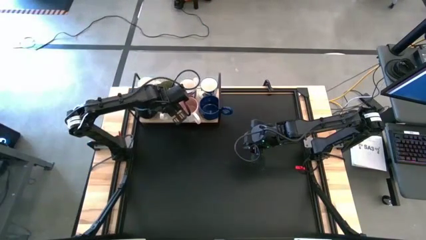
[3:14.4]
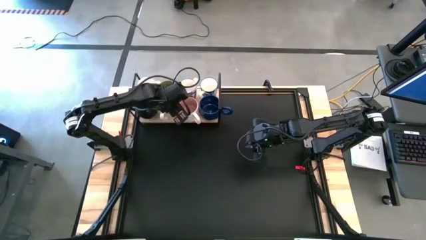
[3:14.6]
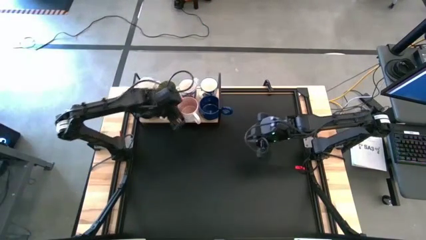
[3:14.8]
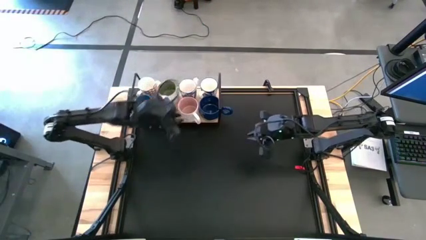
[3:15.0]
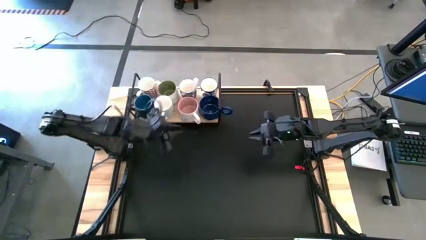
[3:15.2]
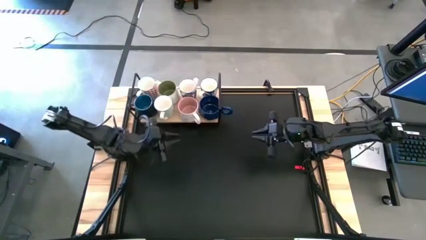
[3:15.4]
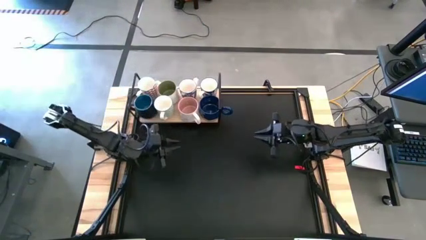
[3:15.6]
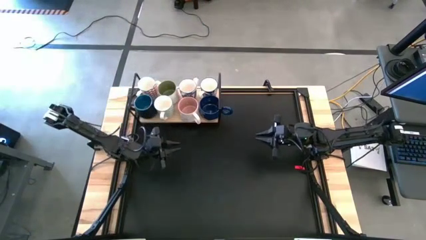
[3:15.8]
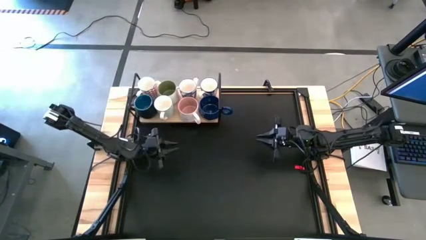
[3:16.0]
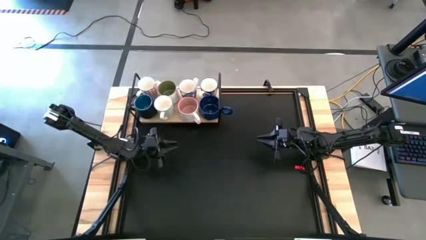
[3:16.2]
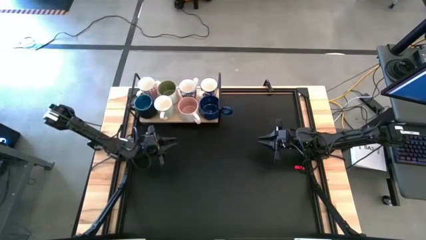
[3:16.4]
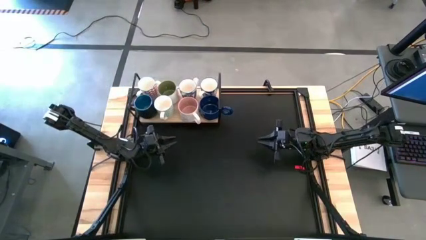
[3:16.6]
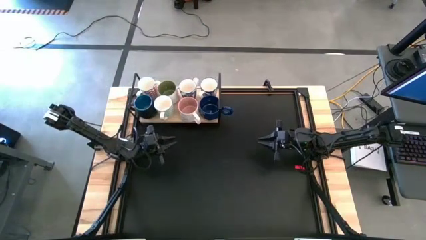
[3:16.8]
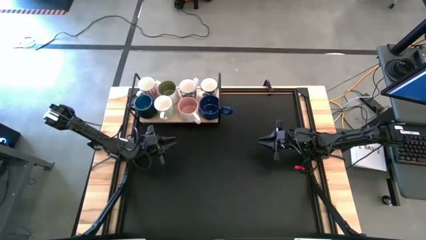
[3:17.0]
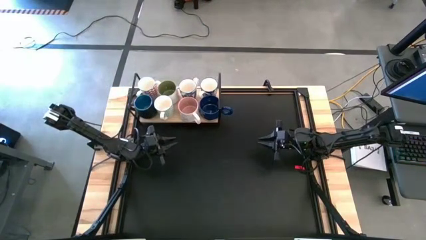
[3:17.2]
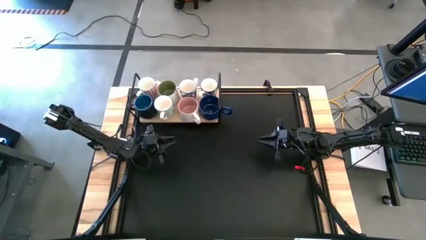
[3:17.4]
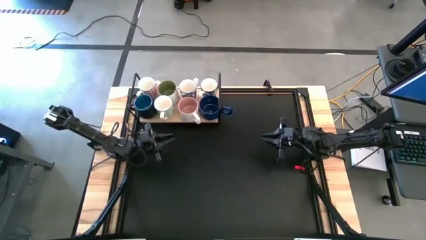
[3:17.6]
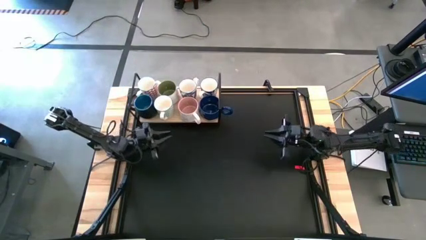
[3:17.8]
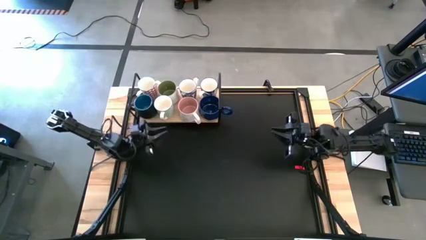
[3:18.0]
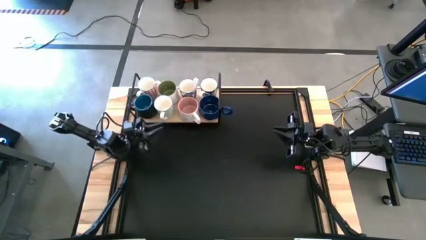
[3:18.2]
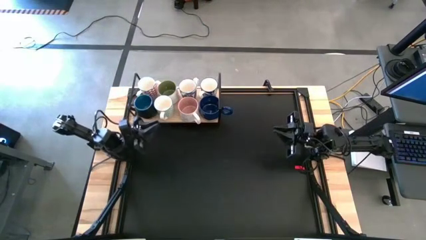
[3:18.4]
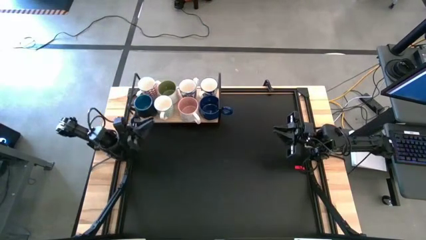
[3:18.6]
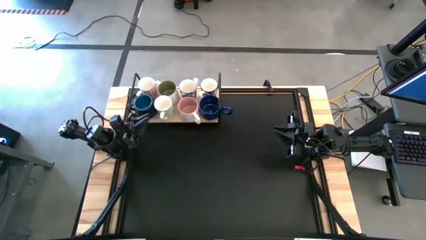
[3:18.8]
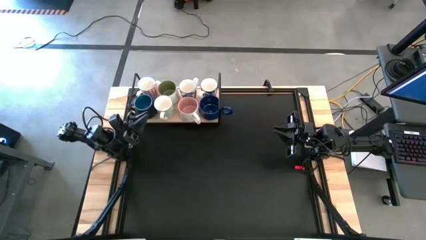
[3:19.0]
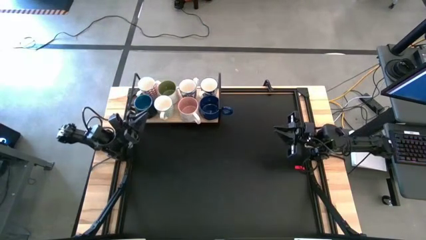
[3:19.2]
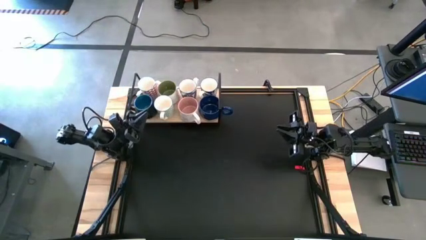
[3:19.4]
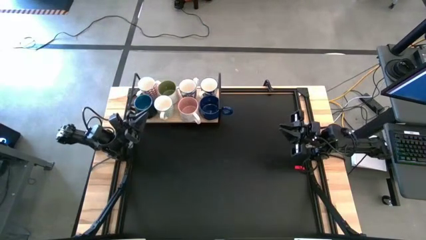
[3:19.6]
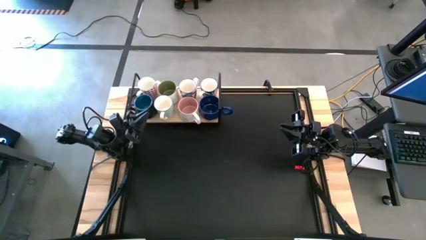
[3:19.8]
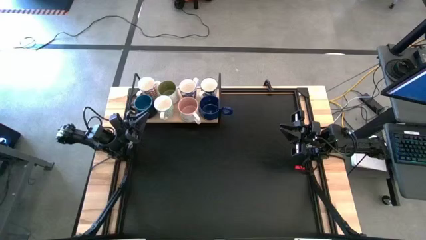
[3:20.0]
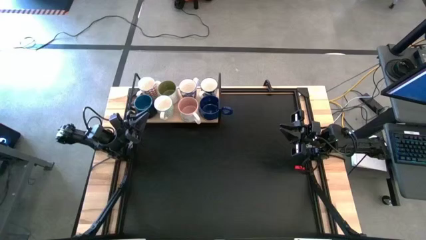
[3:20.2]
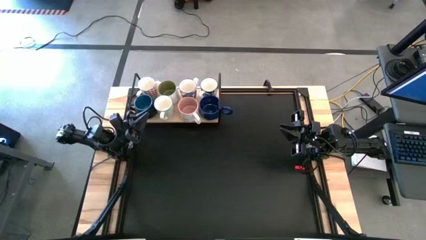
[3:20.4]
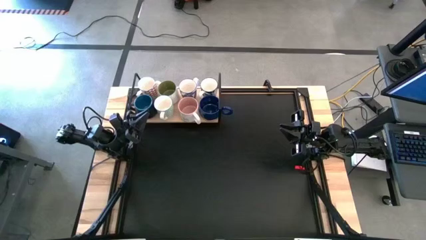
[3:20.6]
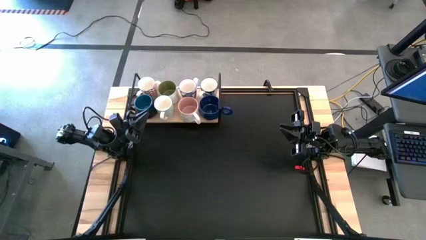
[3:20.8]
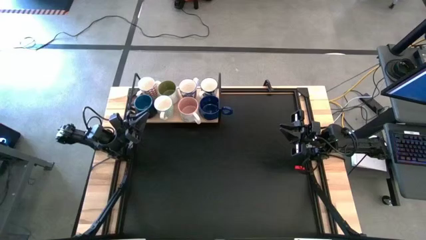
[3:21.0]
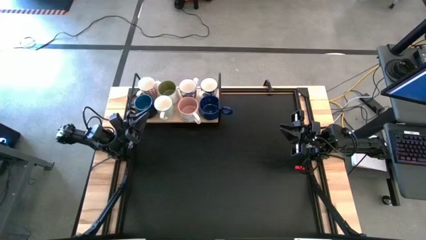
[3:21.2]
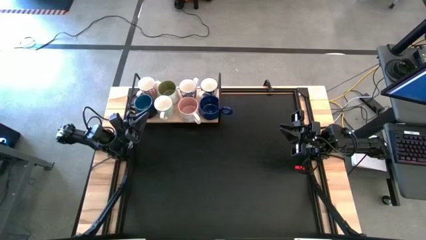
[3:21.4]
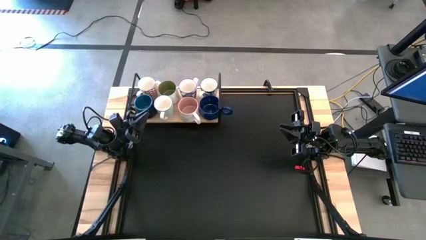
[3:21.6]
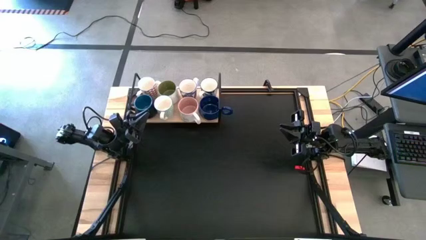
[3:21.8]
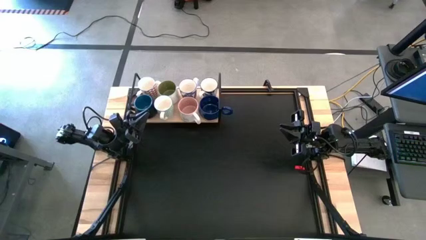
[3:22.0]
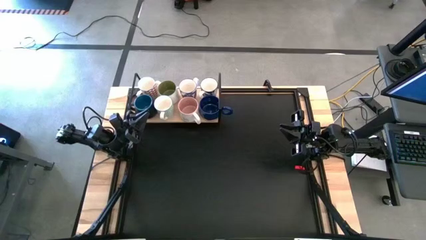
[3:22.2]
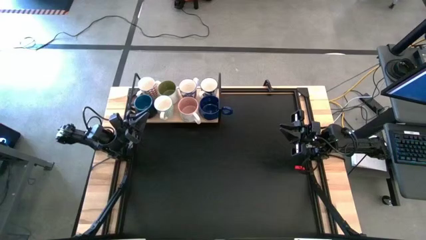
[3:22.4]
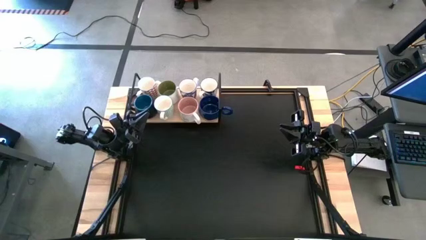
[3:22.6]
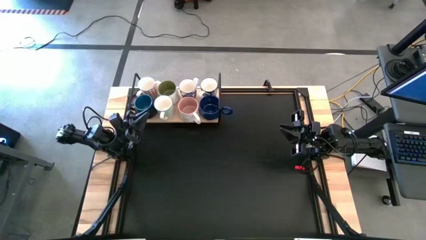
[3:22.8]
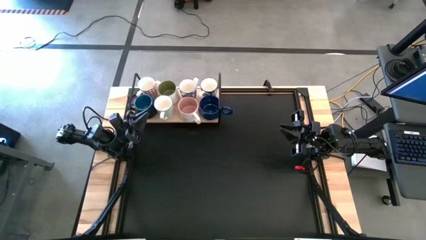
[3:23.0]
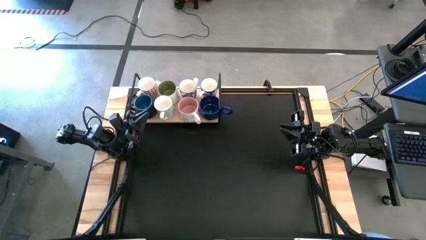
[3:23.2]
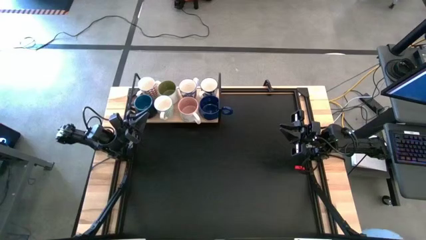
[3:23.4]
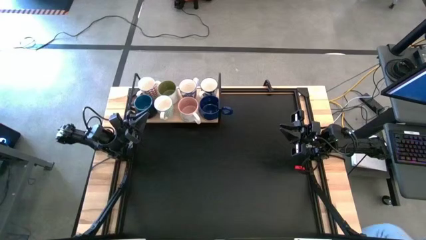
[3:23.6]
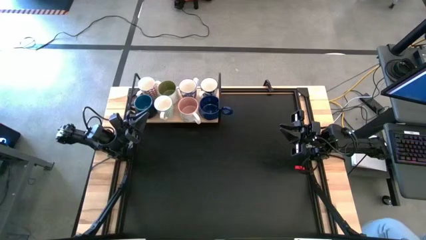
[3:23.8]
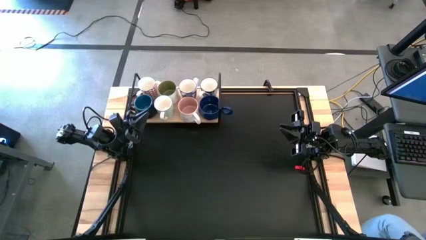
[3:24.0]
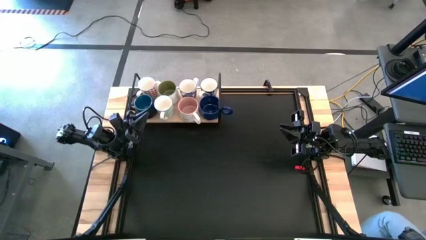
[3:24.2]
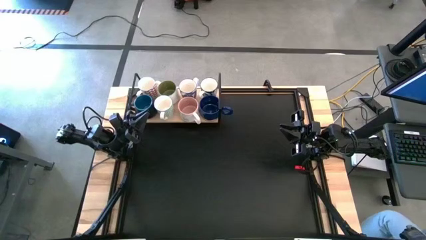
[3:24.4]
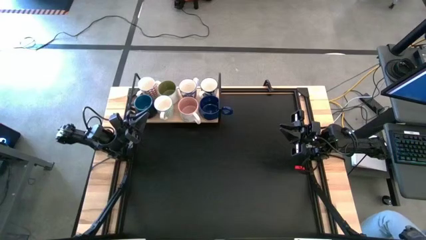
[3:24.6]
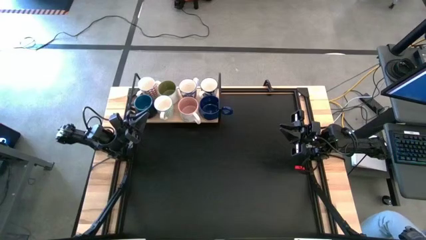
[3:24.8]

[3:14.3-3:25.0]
Task: Place coffee mugs
Return to Home Position

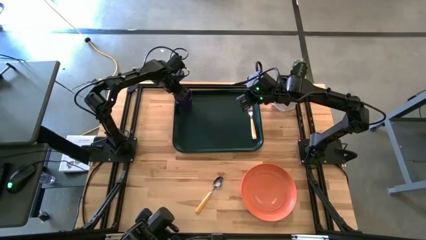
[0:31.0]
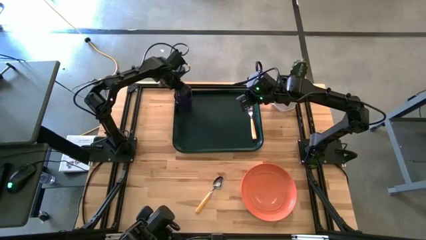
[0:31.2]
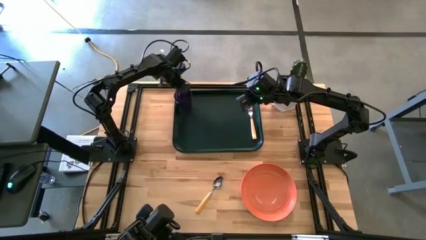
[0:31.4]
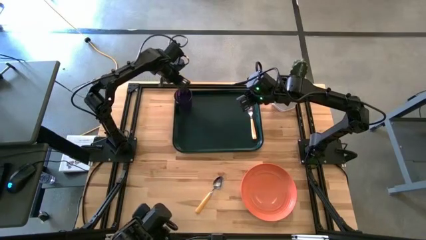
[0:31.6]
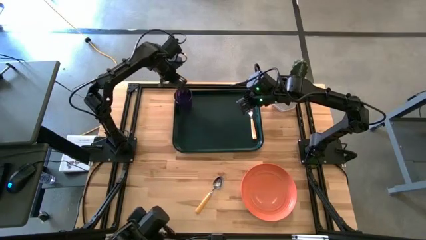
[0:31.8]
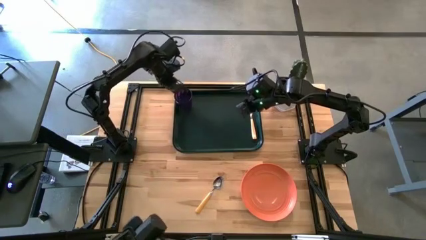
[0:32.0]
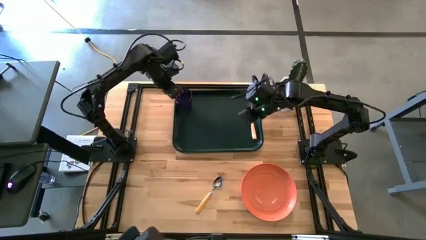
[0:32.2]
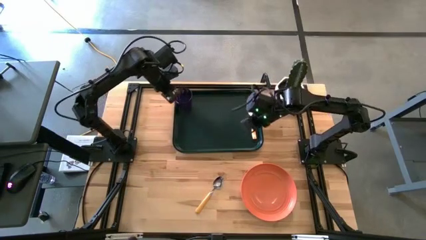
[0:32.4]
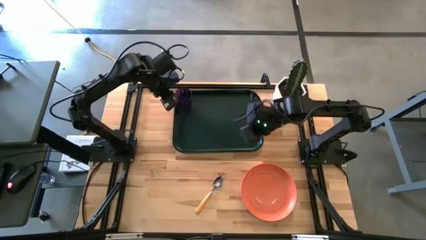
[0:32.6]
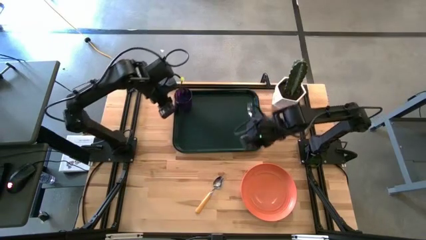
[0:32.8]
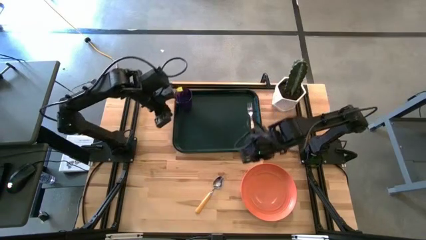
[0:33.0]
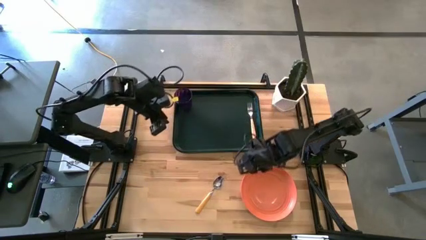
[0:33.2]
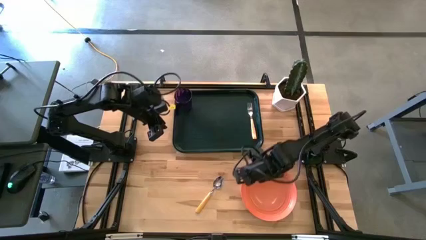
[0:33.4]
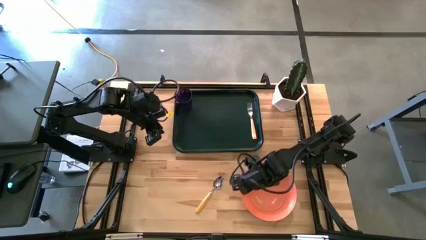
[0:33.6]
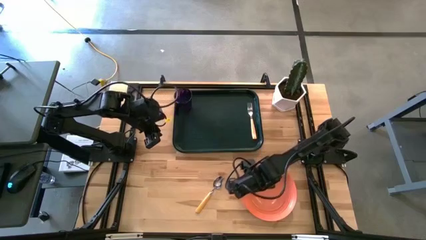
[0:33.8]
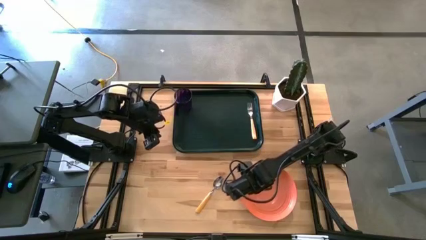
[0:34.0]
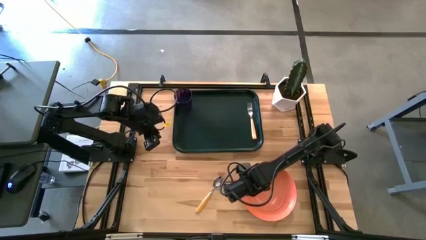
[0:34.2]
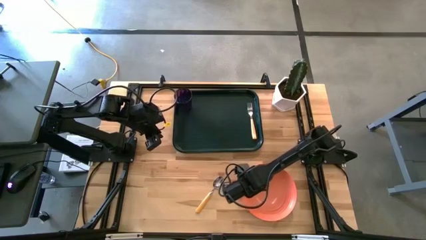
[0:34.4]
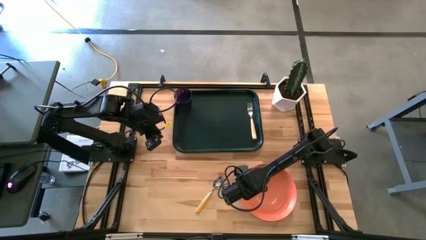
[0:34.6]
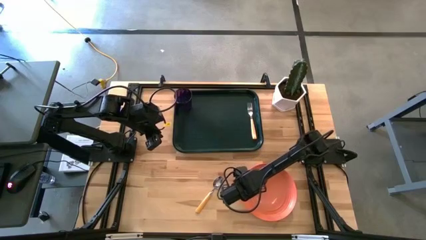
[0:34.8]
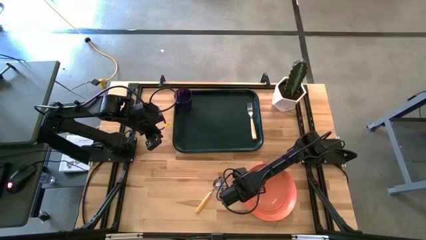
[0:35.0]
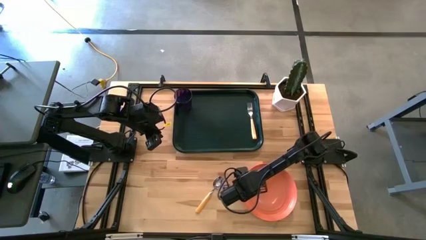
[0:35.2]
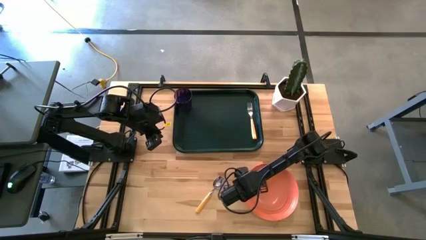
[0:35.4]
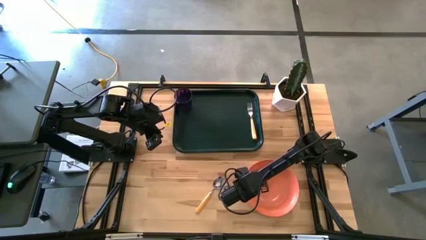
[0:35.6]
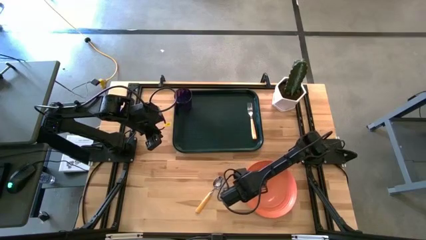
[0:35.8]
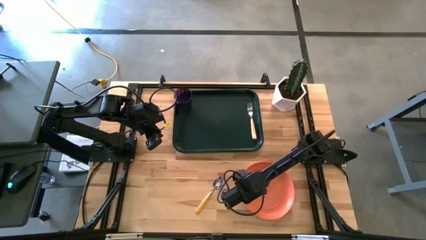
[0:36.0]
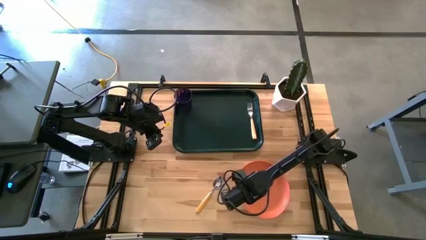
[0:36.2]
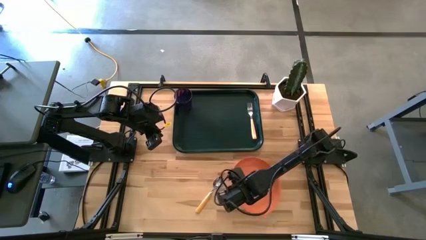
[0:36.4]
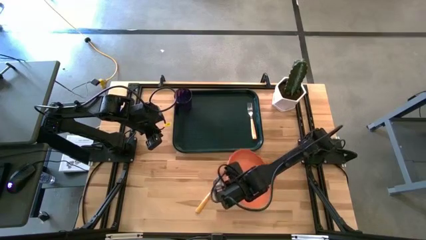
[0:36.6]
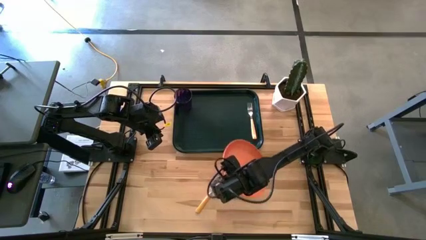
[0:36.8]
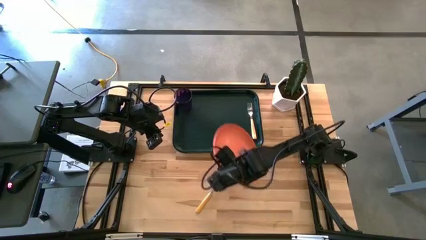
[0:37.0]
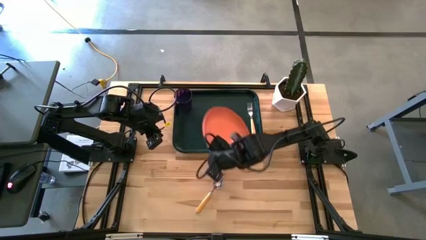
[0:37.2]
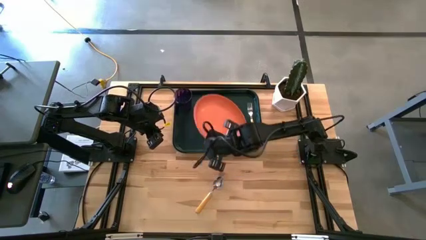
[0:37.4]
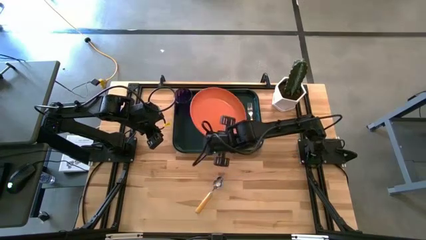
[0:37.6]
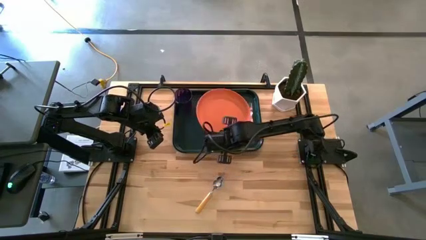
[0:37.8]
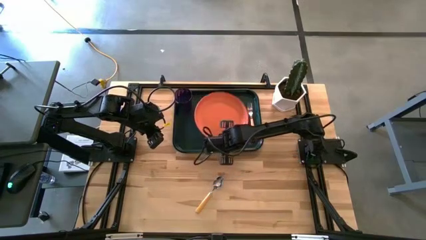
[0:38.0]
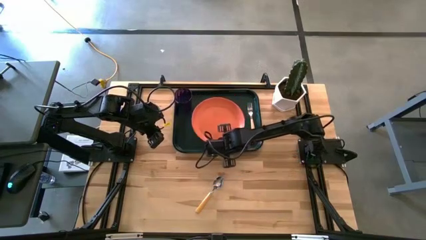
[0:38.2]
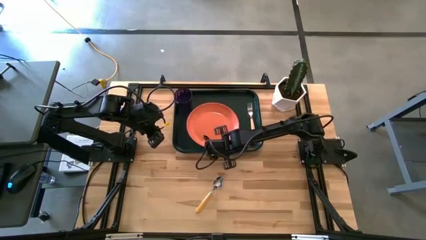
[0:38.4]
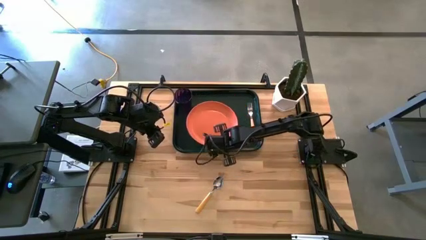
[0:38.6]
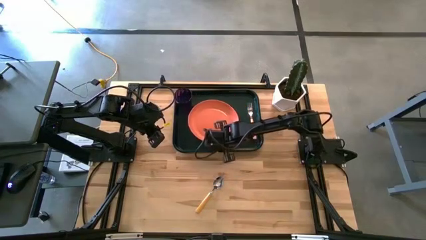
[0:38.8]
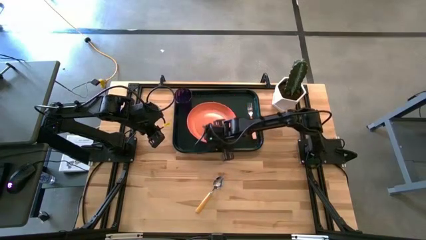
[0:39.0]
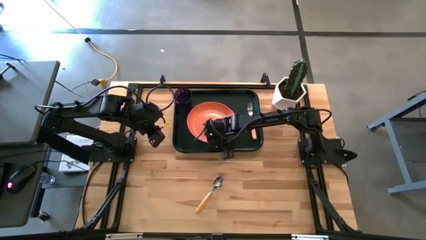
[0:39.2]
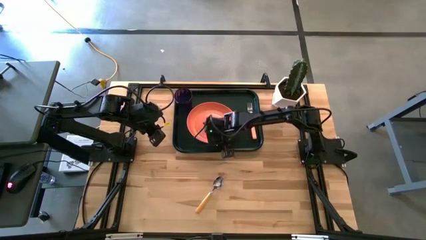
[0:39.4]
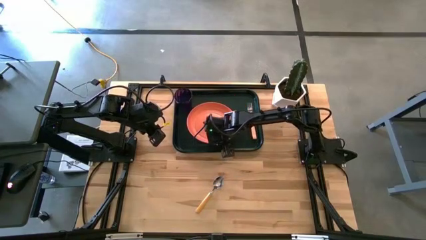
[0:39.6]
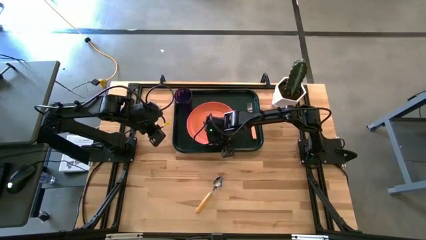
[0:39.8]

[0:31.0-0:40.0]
Task: Pick and place plate/cup/fork/spoon on tray
Put the orange plate on the bottom right of the purple cup
